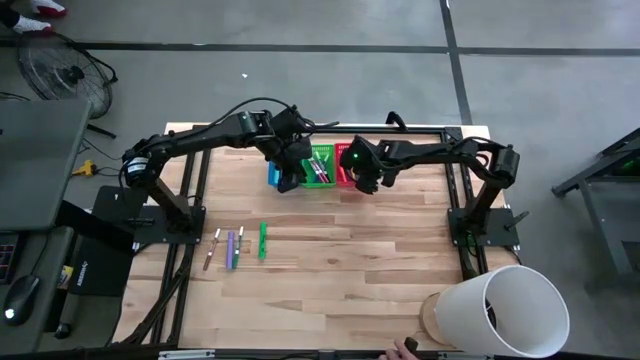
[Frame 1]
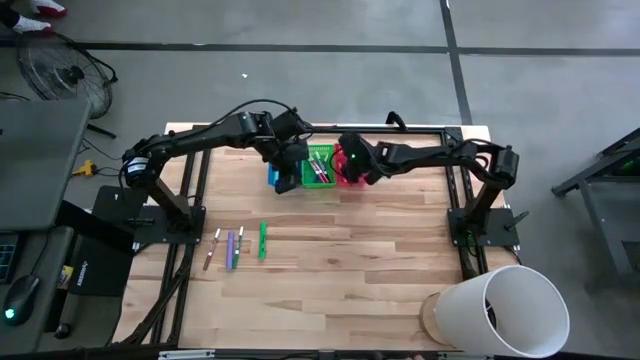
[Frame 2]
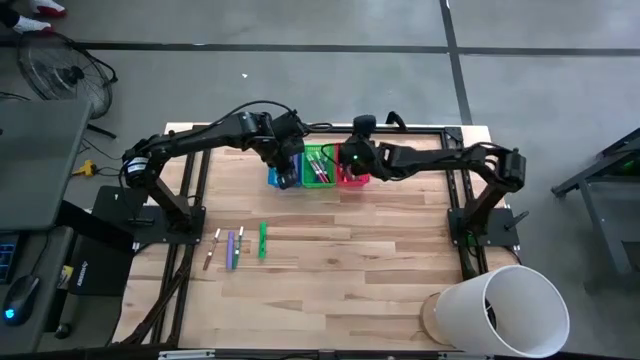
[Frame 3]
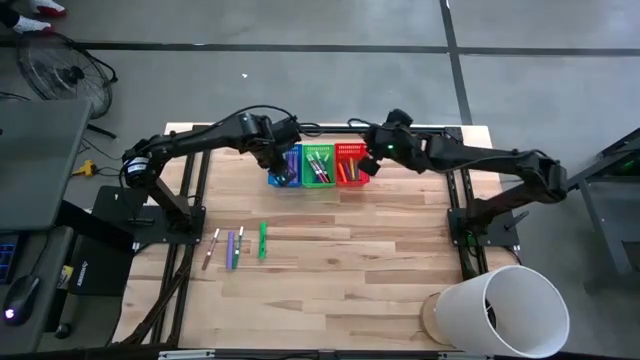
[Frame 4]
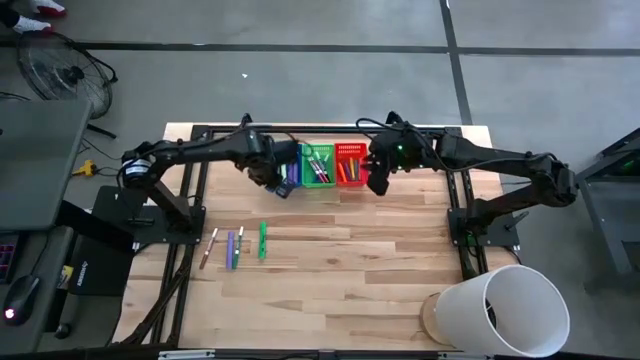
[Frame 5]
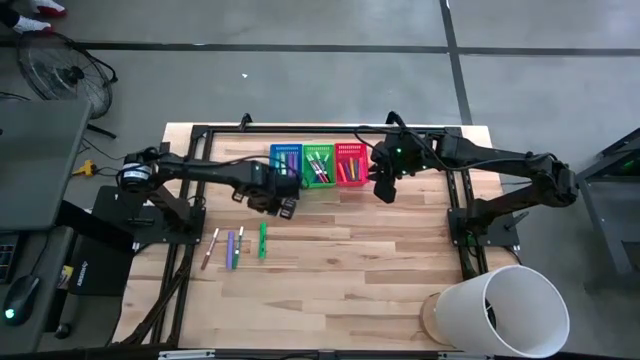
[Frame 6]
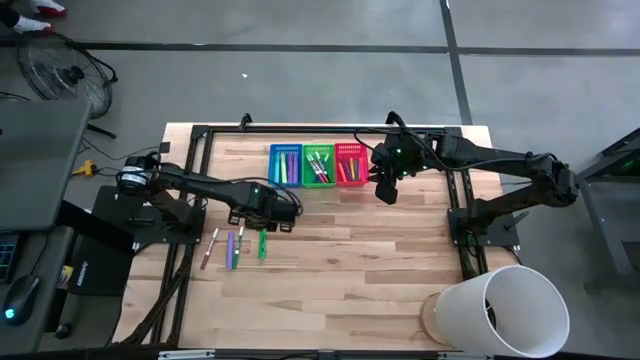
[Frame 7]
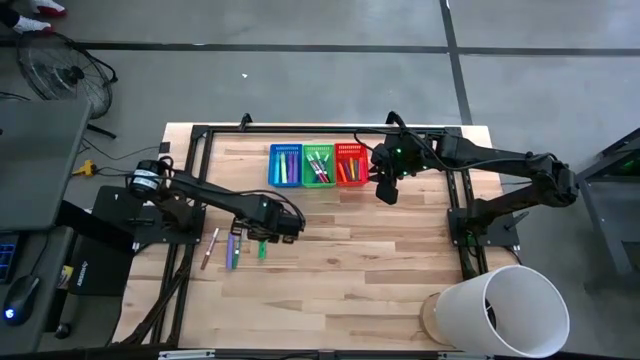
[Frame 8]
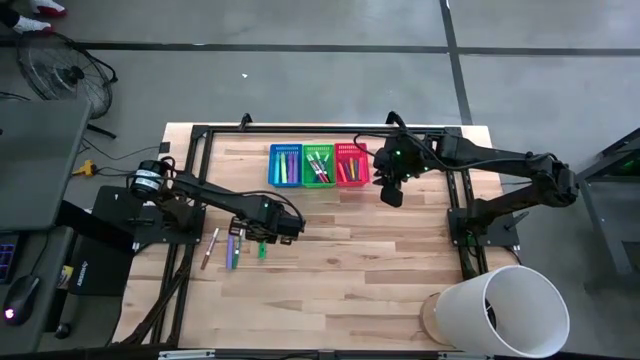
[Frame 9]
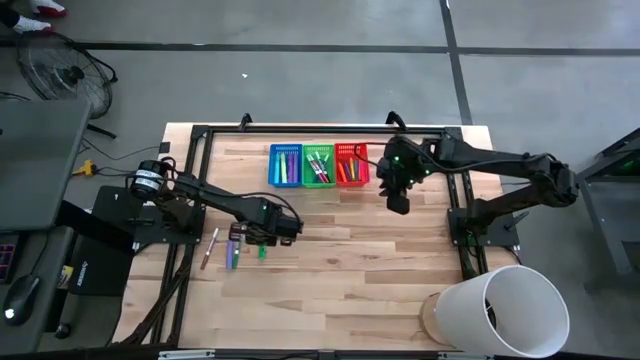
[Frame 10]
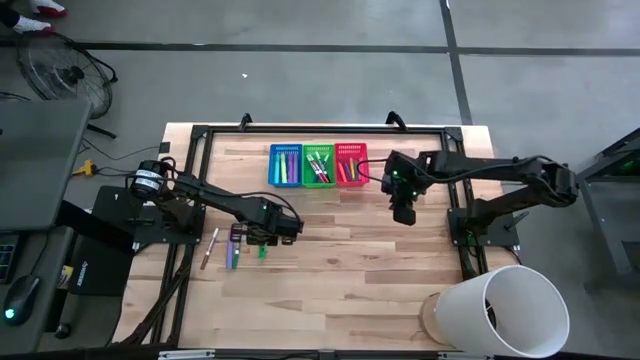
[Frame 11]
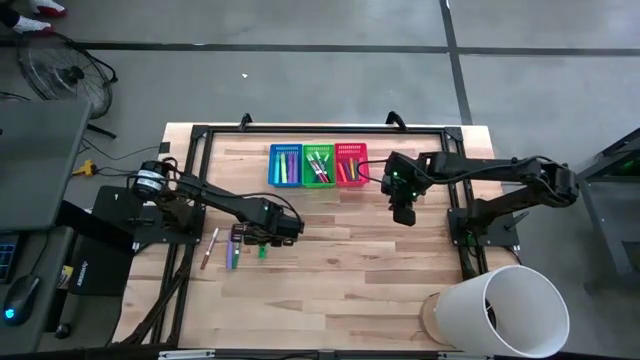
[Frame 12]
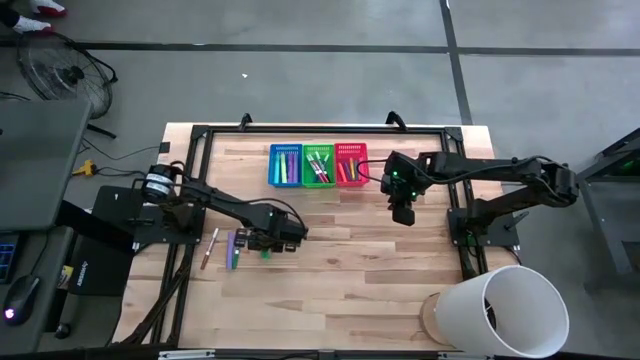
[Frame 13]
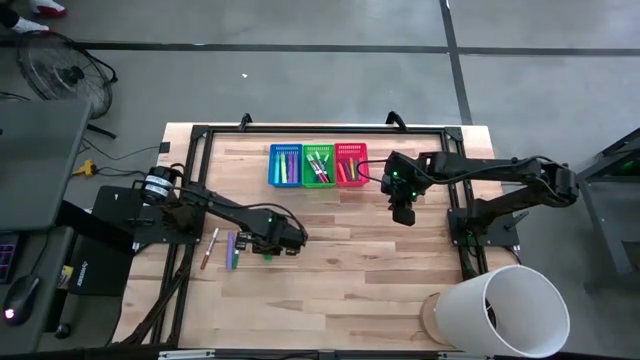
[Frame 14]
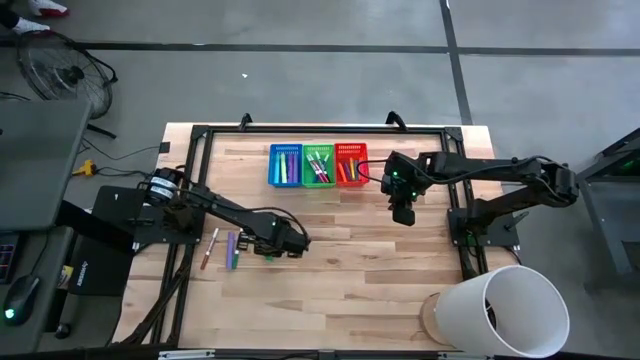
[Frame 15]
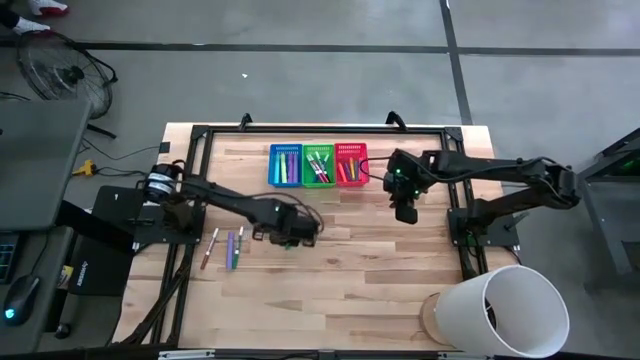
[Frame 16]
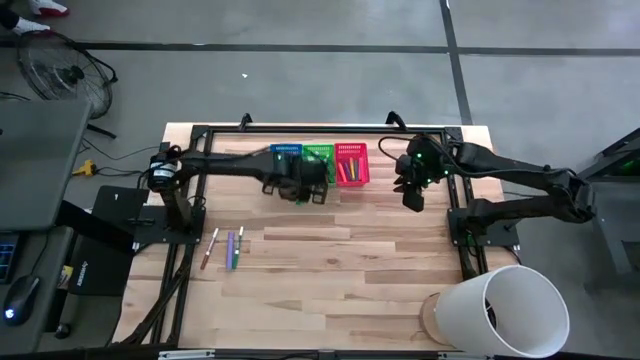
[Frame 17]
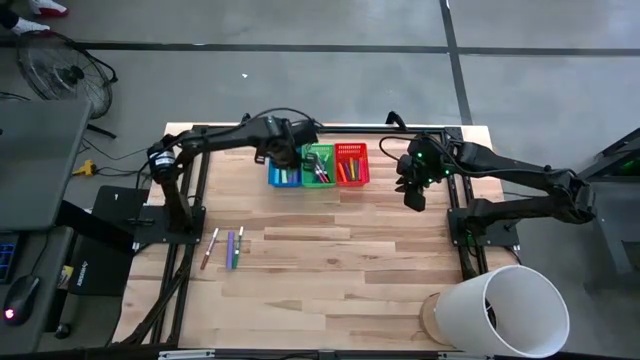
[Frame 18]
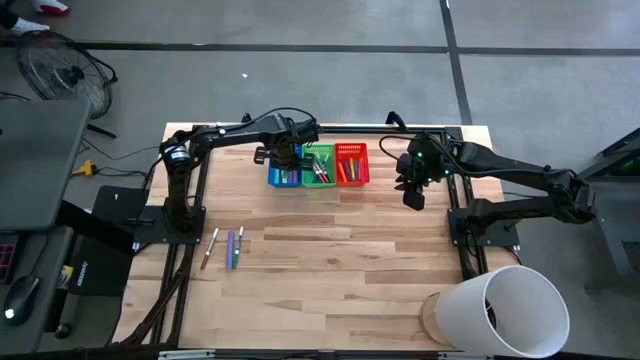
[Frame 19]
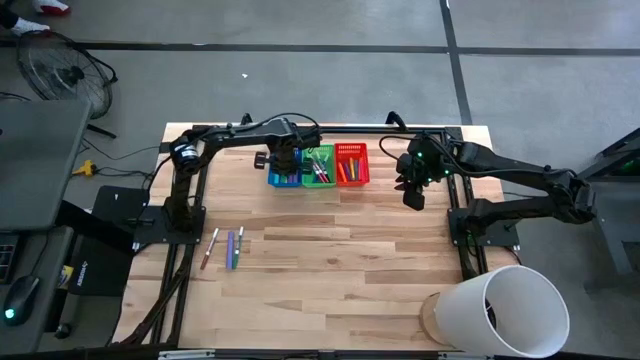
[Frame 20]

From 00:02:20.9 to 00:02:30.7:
Task: Pick & Place Markers
Put the green highlighter into the blue bin
